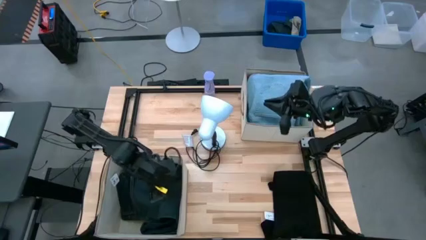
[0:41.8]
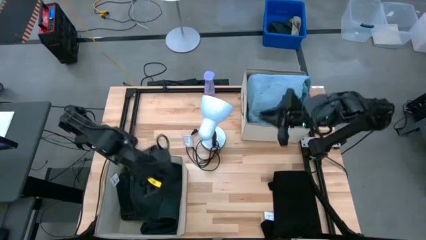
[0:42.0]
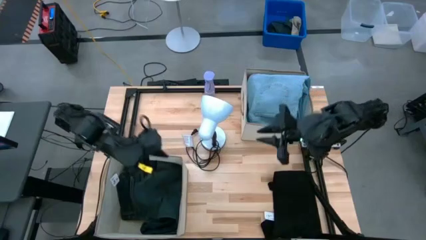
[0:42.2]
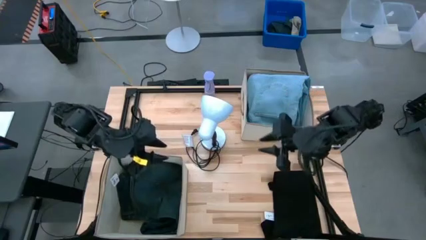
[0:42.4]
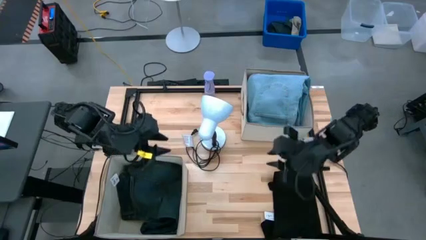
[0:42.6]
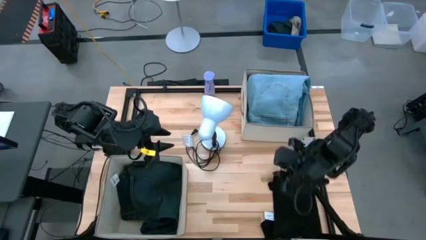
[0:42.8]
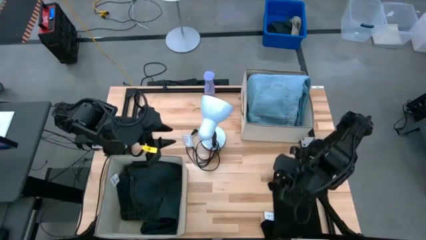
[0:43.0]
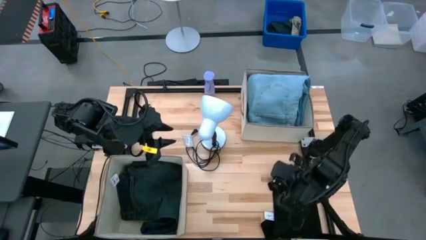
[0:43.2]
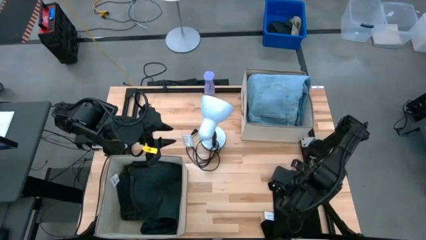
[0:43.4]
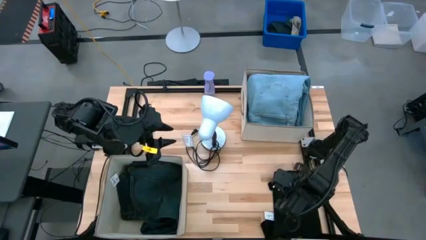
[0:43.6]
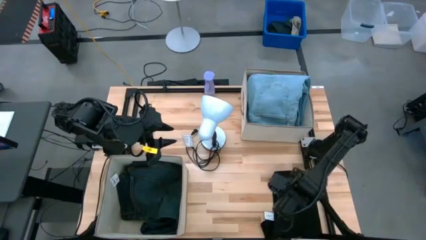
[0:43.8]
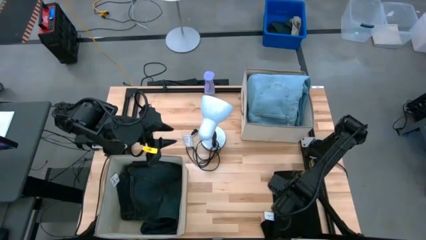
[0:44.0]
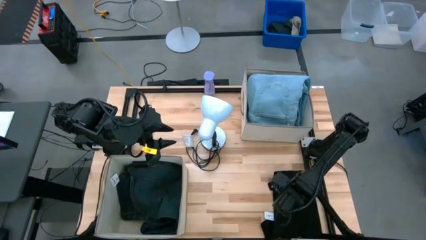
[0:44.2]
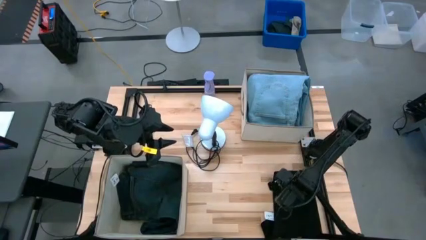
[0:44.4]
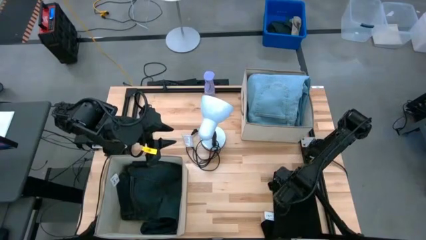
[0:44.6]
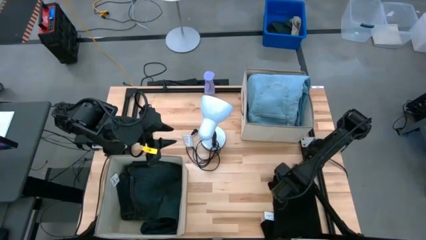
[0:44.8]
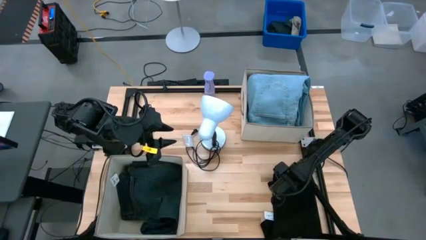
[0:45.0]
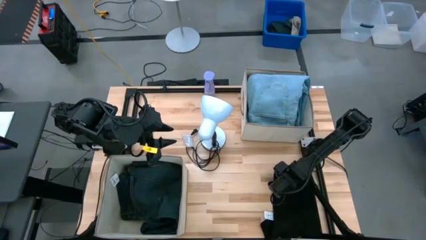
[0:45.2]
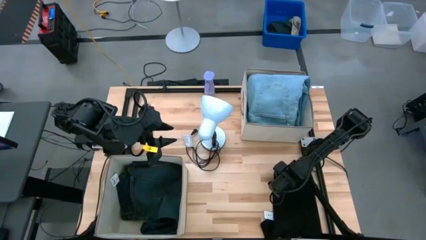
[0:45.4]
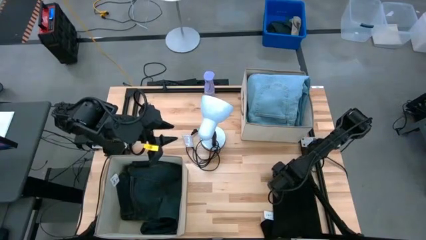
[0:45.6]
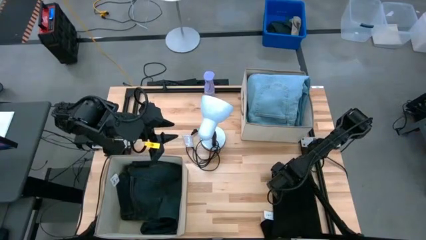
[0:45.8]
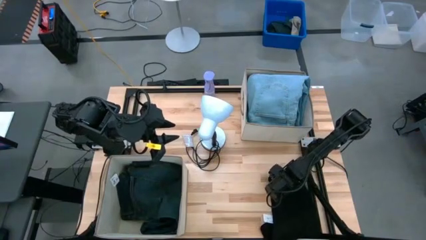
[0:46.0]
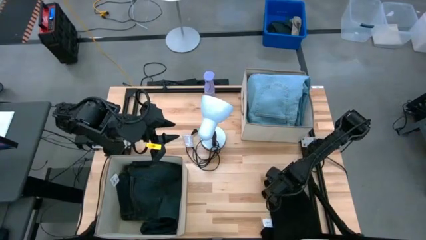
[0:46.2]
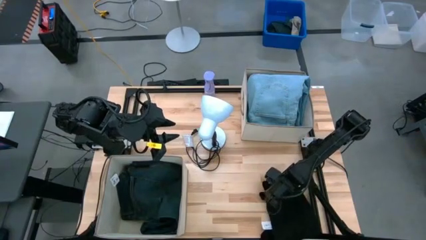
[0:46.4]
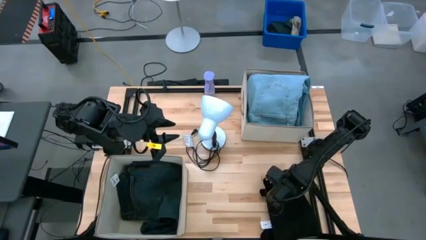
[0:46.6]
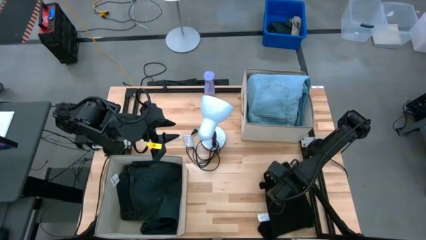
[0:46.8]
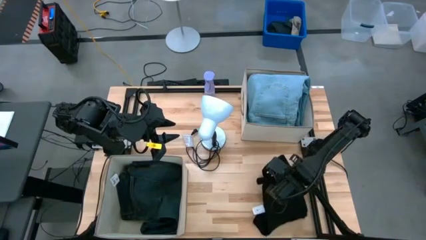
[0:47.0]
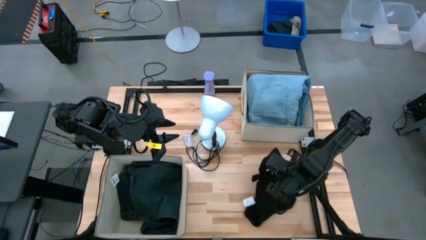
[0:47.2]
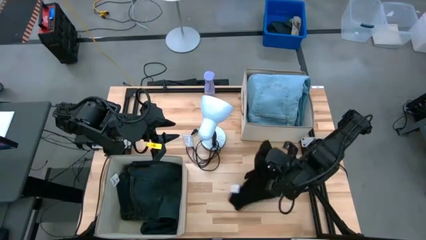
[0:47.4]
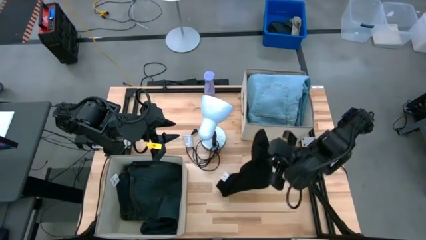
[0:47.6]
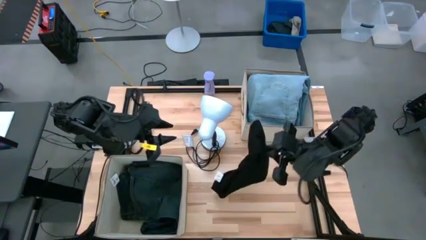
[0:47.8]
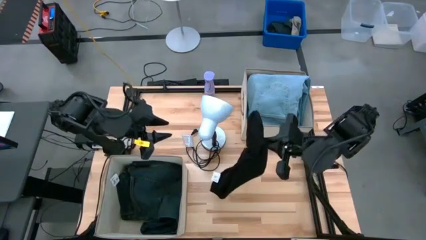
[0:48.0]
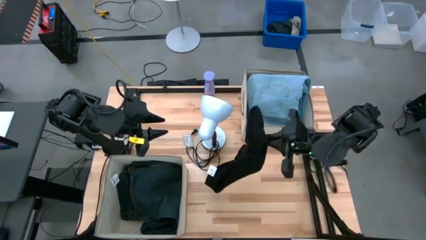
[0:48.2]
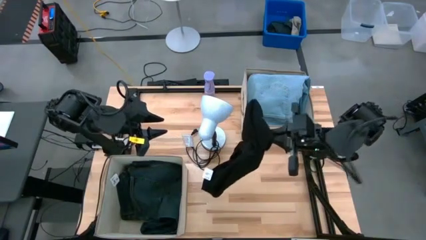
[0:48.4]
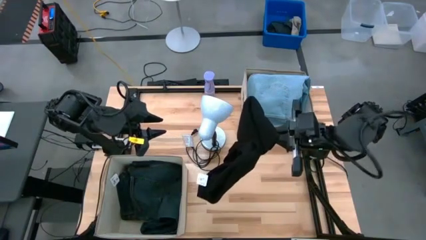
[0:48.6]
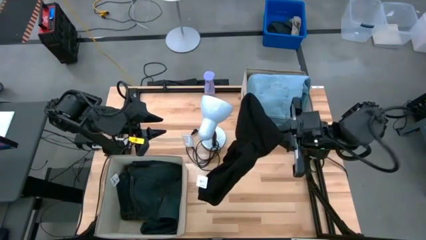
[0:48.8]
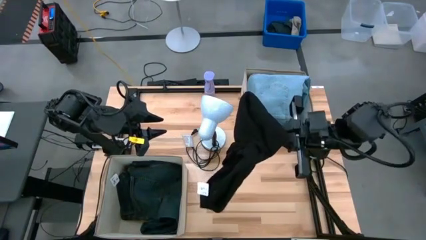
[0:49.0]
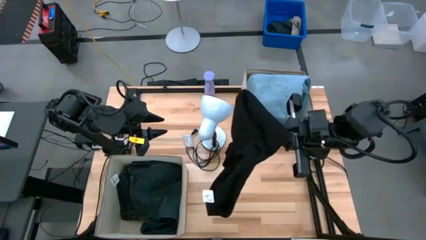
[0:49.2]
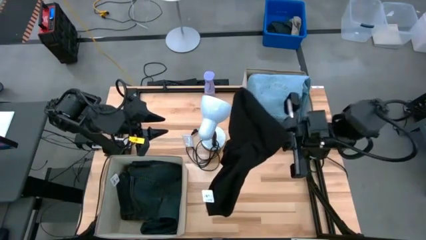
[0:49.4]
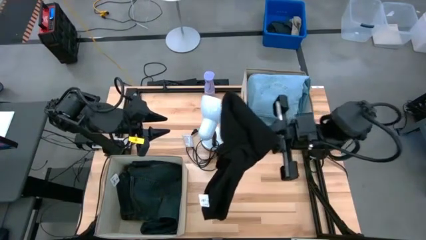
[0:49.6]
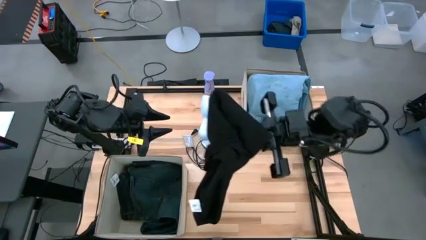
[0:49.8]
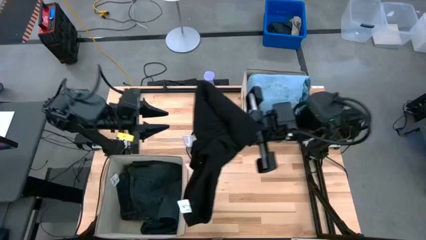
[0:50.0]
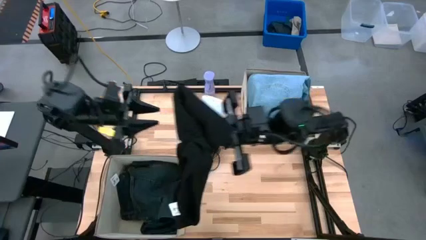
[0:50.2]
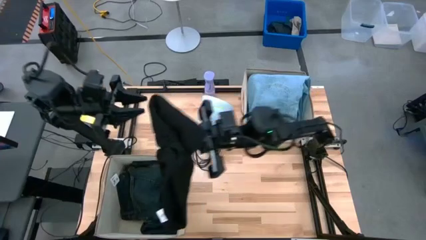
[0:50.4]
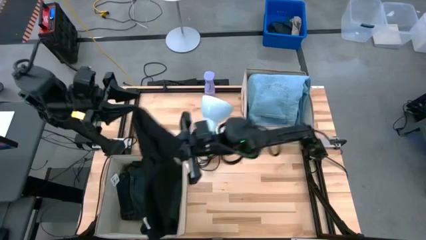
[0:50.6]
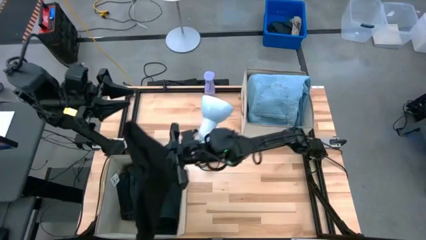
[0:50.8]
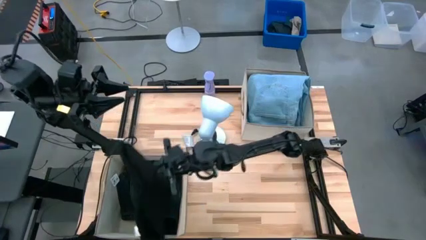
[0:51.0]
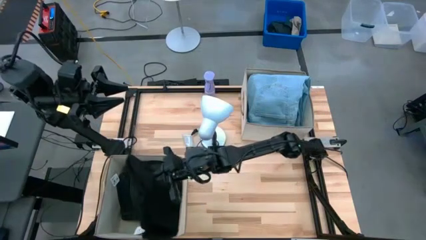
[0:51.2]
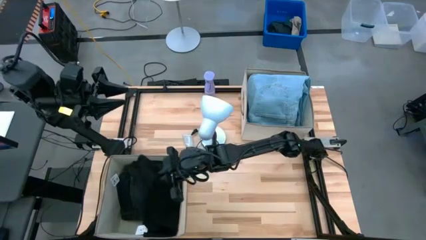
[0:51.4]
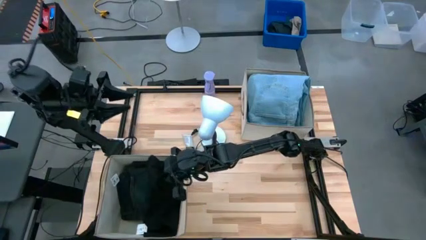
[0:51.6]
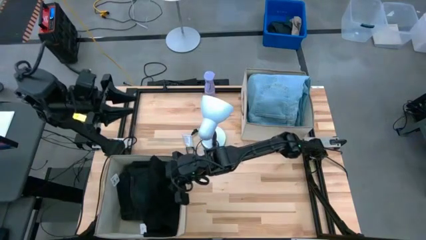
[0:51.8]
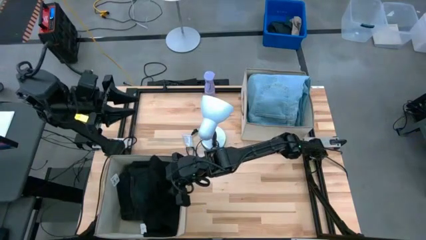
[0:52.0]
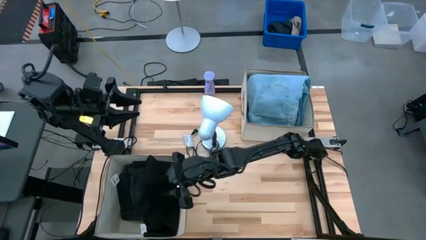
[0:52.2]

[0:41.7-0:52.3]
Task: Sort clothes
Put the black pants into the laundry organizer

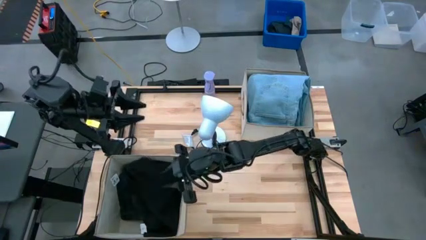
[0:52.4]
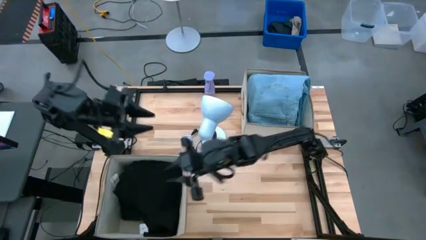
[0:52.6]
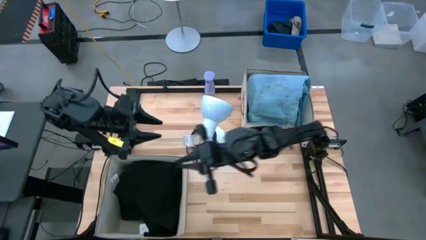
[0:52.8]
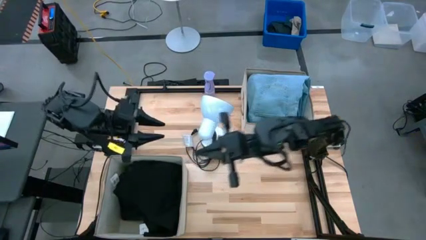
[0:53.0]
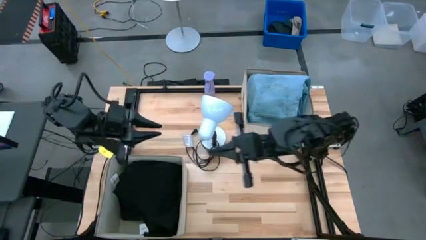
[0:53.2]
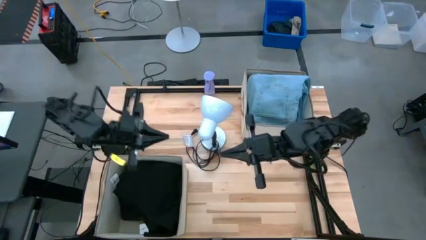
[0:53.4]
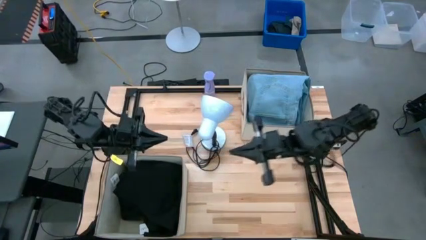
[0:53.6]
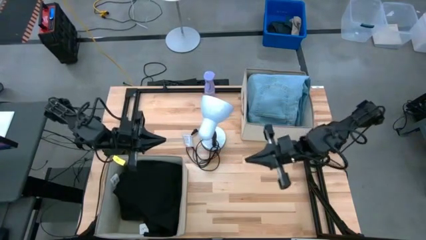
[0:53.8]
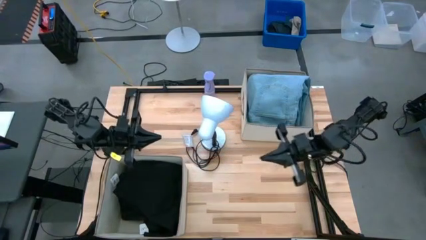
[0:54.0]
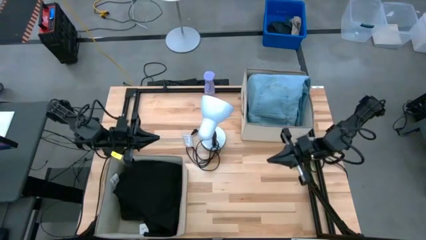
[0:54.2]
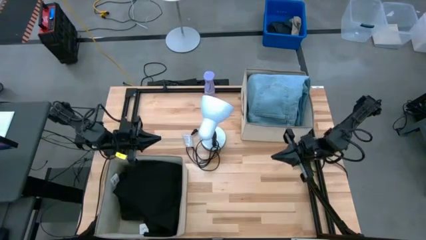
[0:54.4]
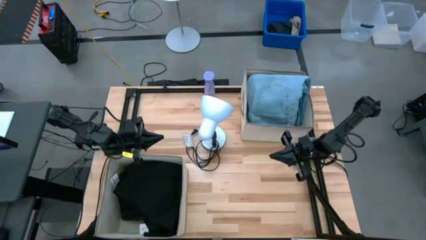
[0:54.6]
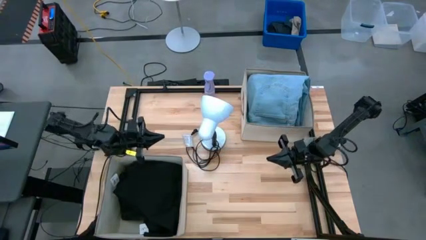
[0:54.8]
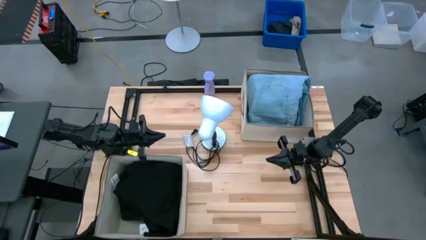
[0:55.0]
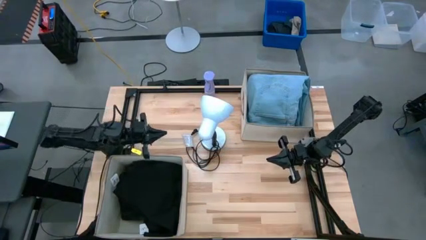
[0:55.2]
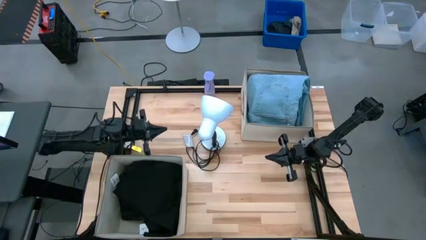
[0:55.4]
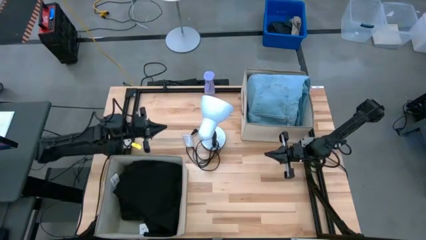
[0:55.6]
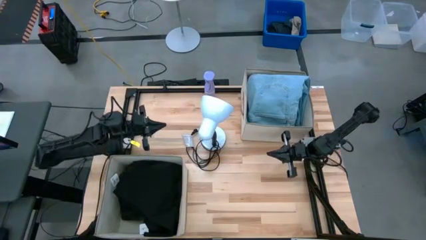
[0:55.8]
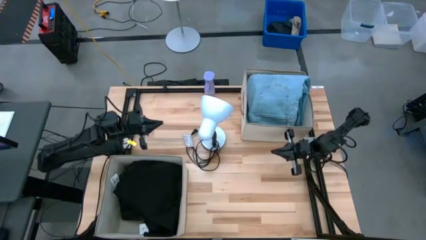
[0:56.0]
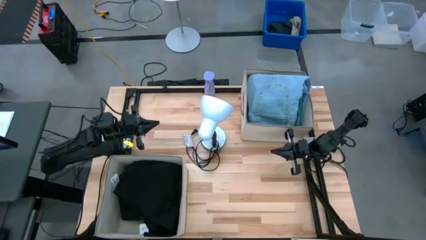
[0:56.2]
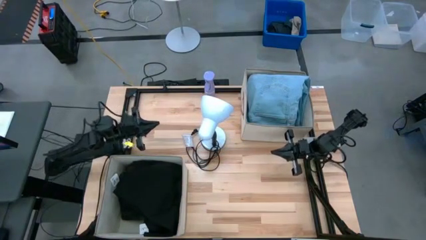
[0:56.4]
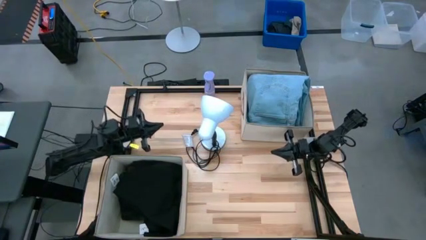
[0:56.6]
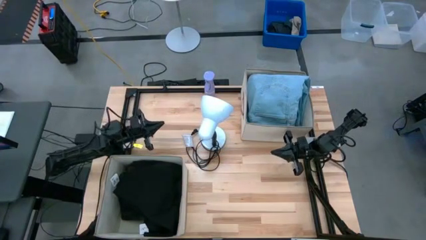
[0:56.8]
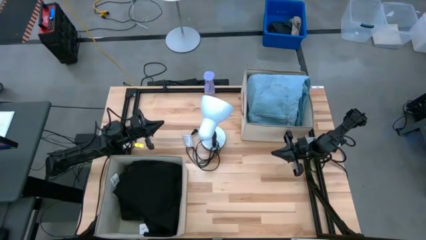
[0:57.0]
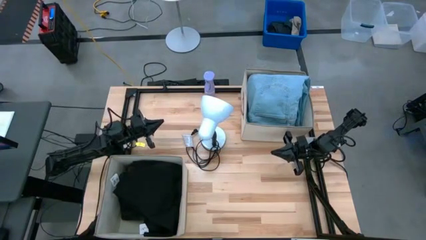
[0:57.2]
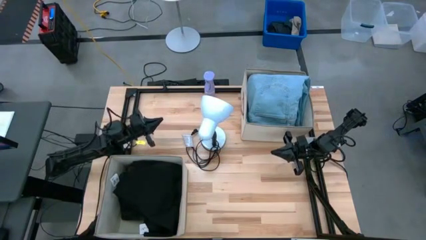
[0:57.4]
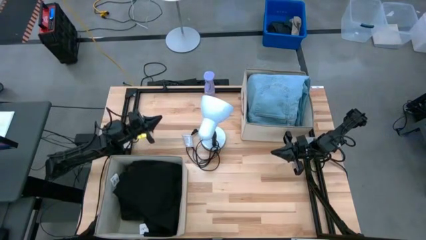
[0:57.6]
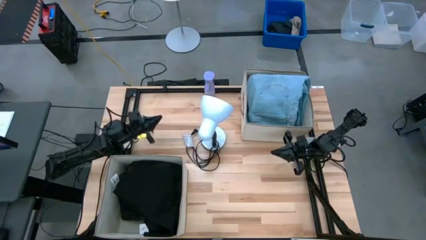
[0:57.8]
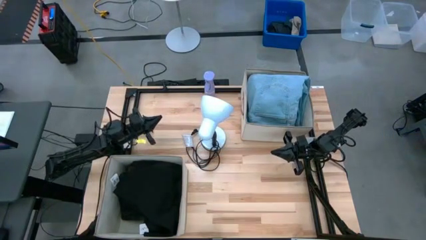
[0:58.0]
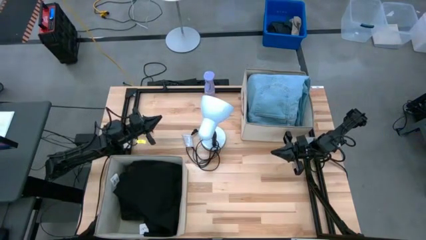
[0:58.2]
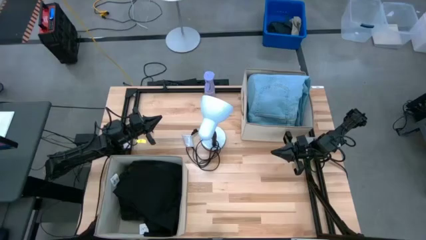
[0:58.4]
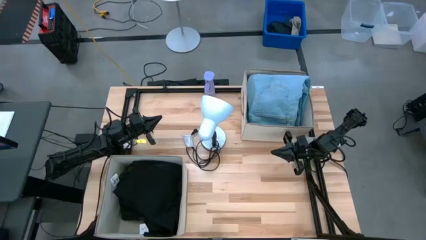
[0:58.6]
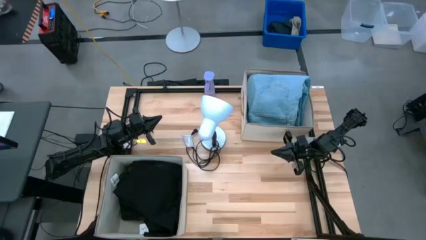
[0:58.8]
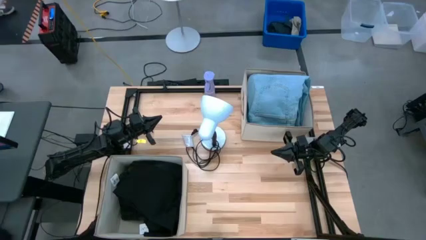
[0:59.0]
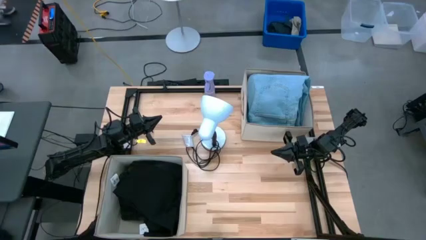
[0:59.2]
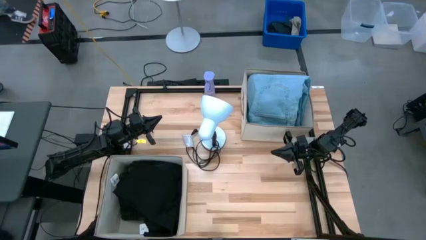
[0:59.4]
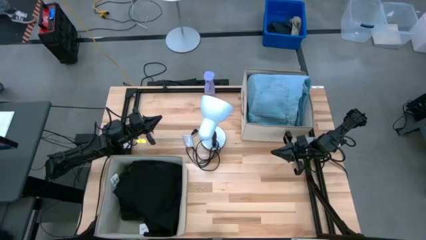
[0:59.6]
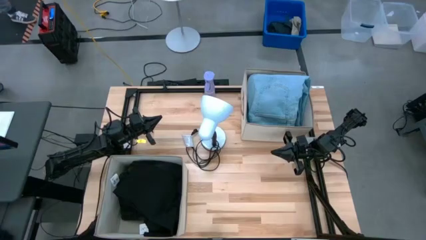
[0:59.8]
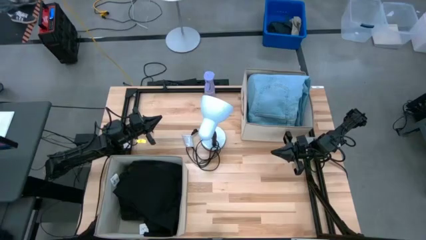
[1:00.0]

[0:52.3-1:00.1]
Return to Home Position
